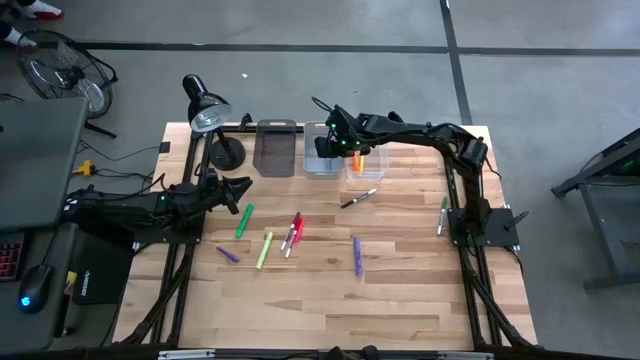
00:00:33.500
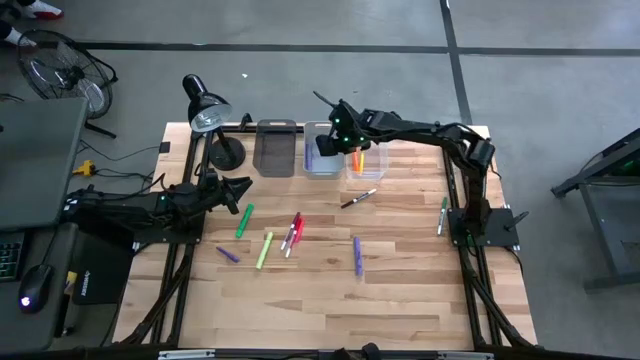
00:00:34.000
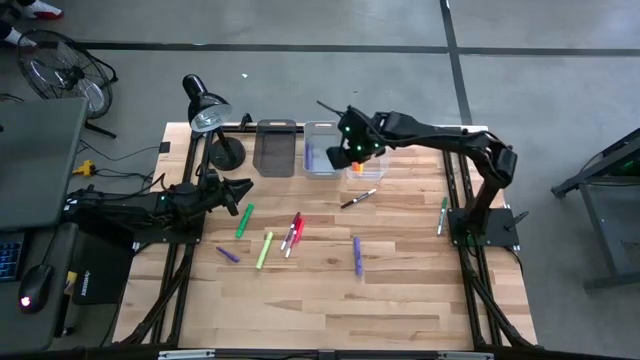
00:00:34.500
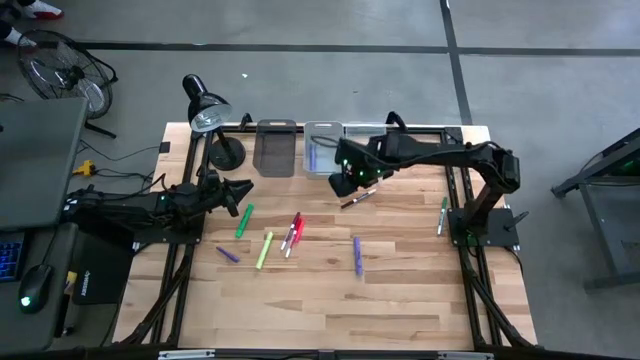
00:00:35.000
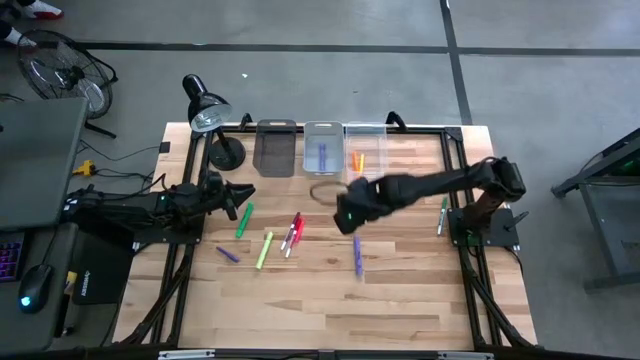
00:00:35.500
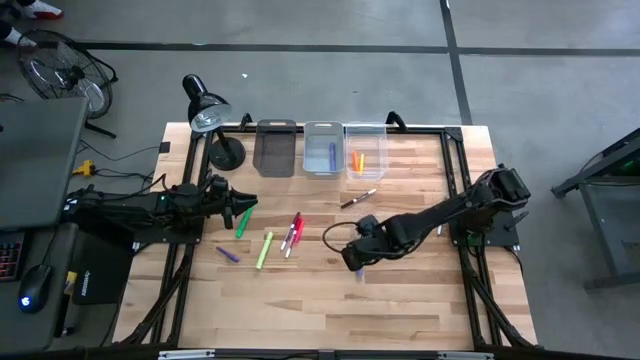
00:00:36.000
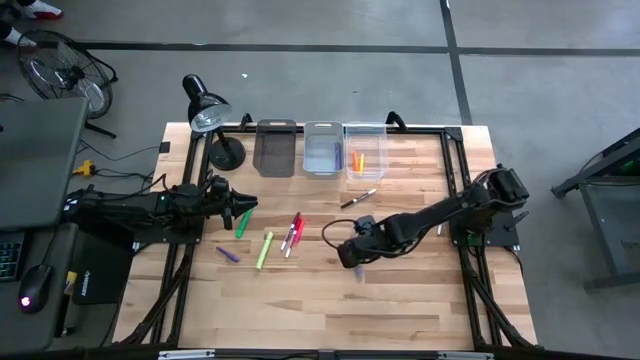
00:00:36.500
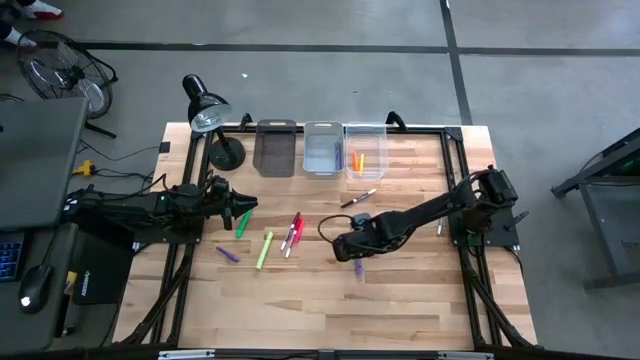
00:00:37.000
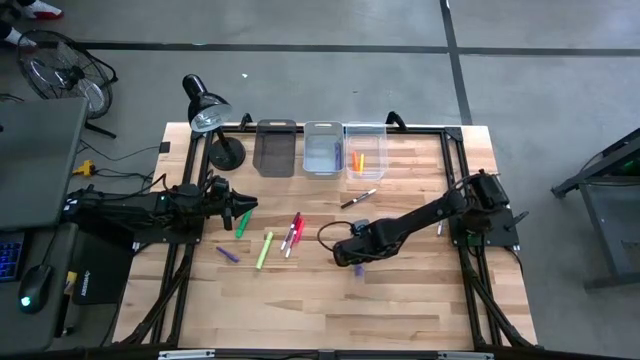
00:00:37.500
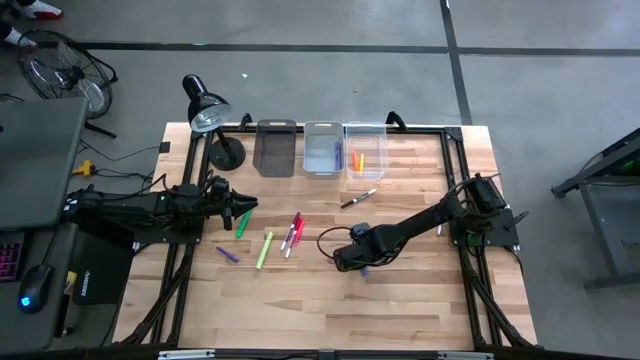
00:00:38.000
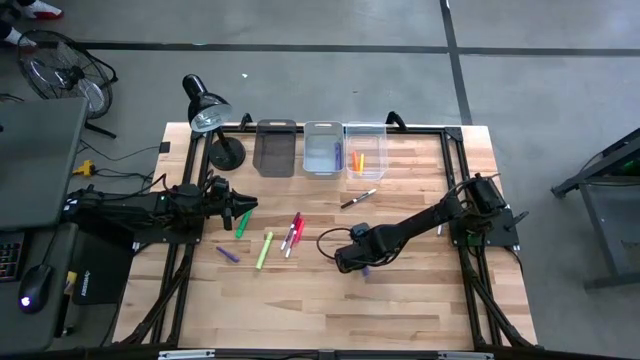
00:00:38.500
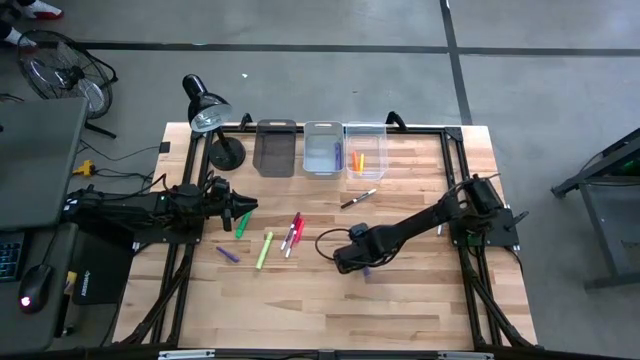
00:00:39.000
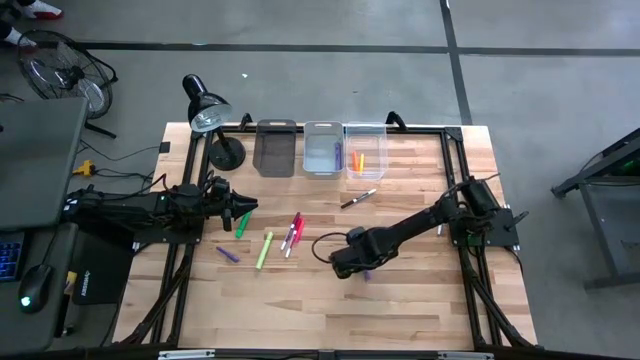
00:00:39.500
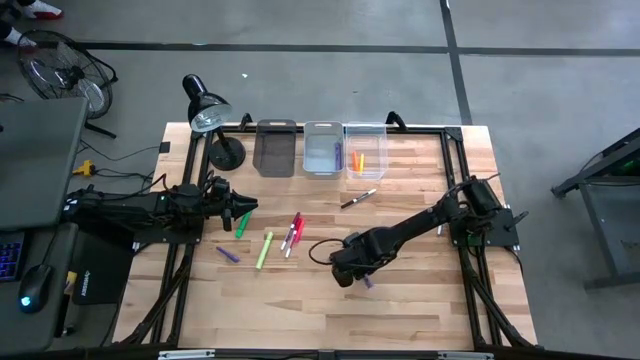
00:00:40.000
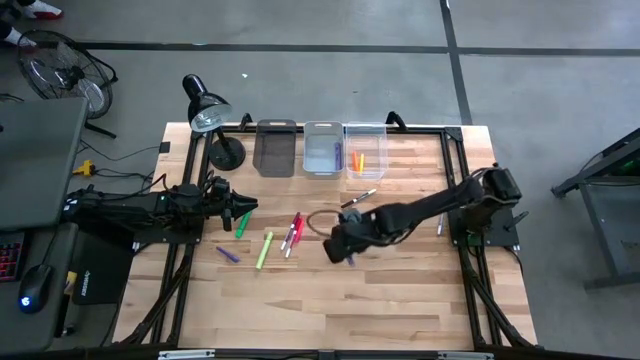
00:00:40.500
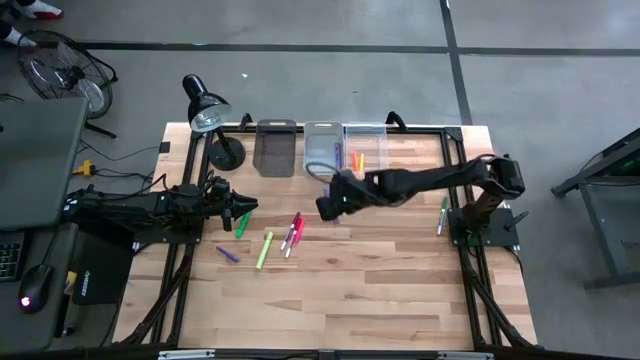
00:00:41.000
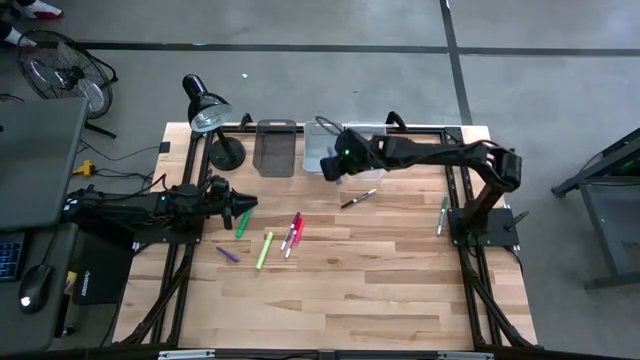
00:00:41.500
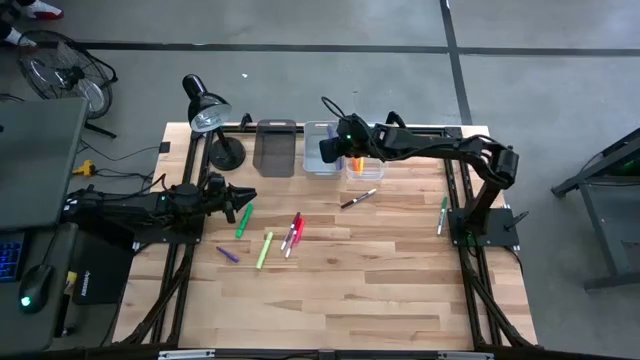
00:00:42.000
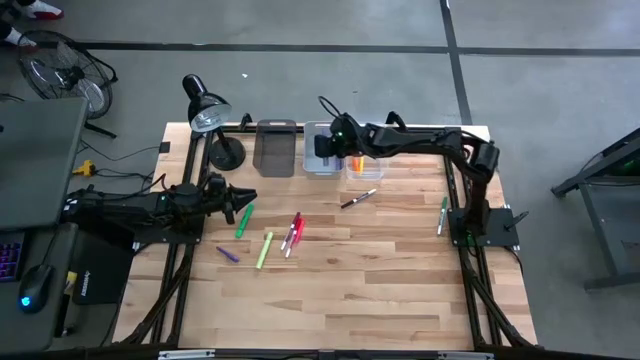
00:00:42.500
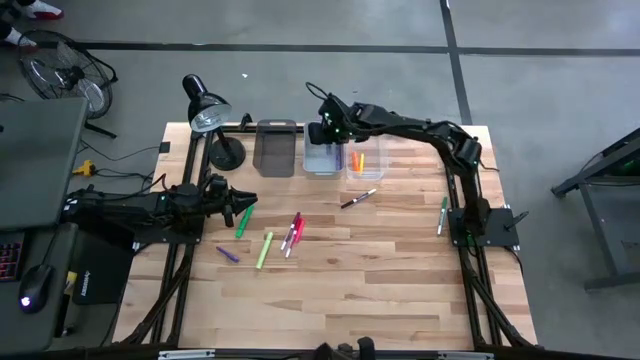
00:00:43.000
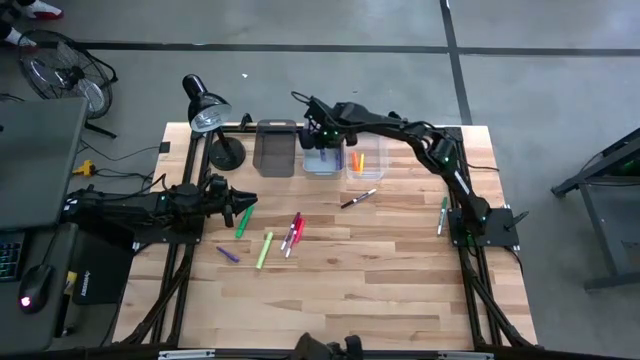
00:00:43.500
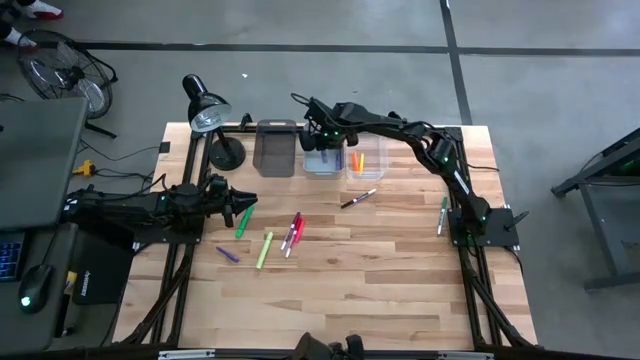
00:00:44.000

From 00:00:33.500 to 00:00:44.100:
Task: Pick & Place Markers
Put the violet highlighter into the white bin

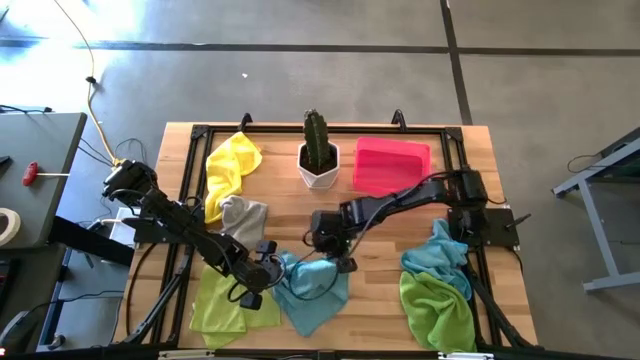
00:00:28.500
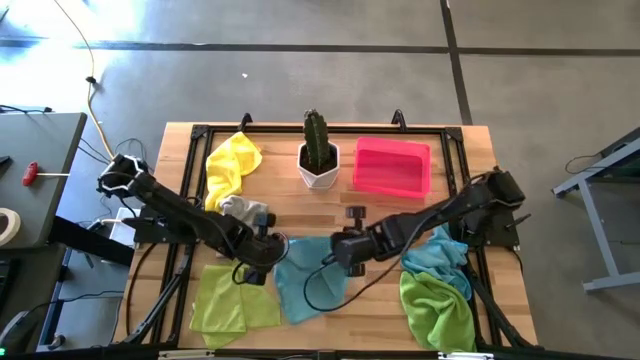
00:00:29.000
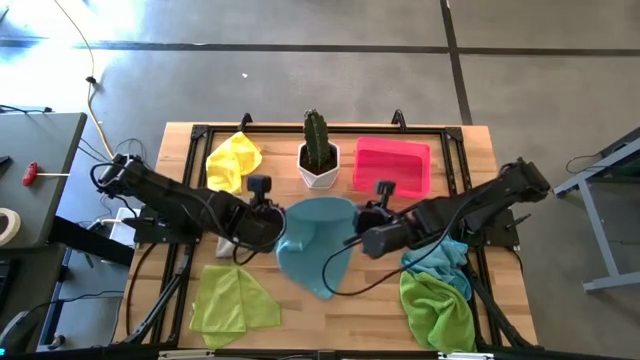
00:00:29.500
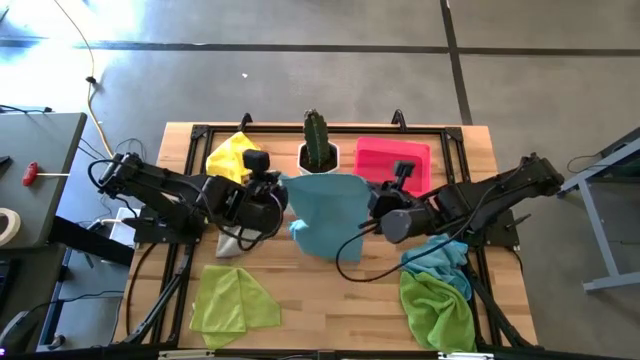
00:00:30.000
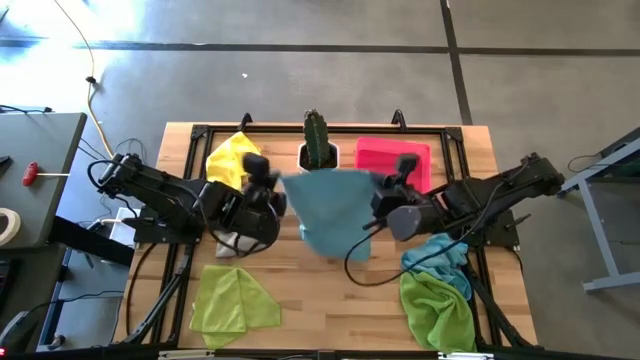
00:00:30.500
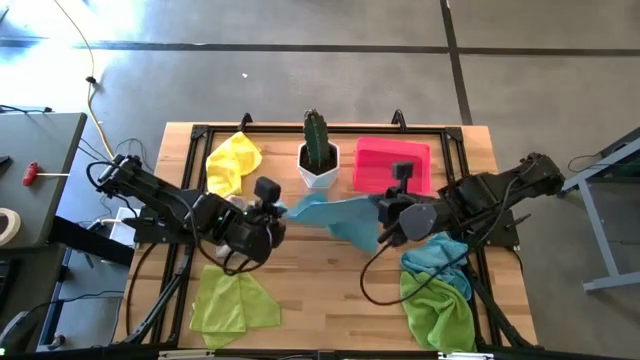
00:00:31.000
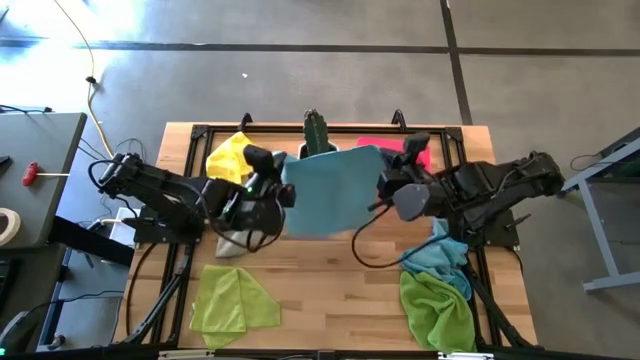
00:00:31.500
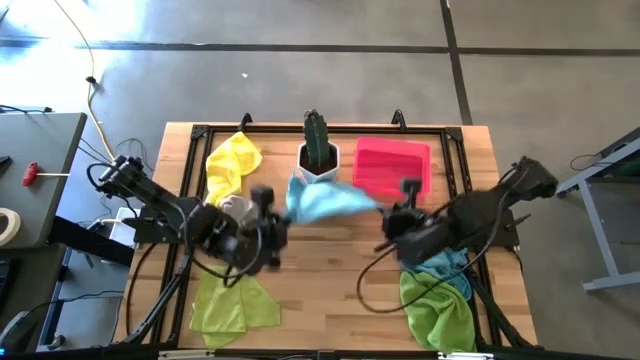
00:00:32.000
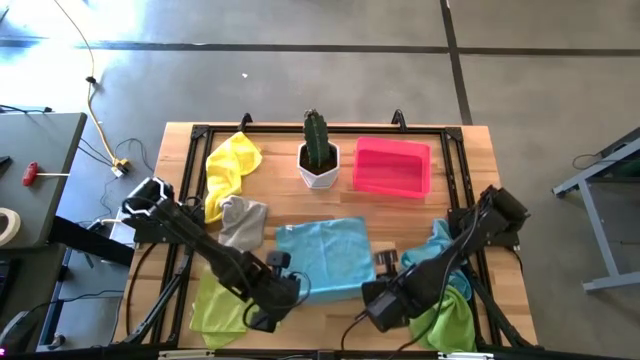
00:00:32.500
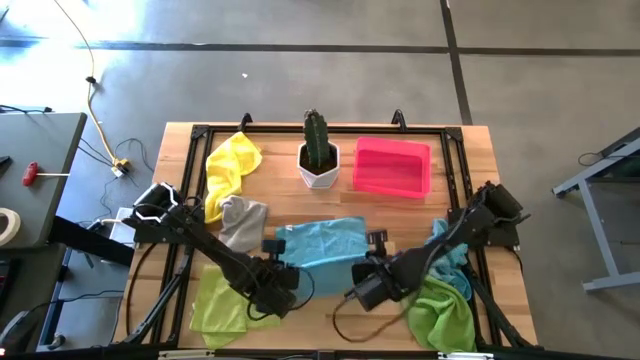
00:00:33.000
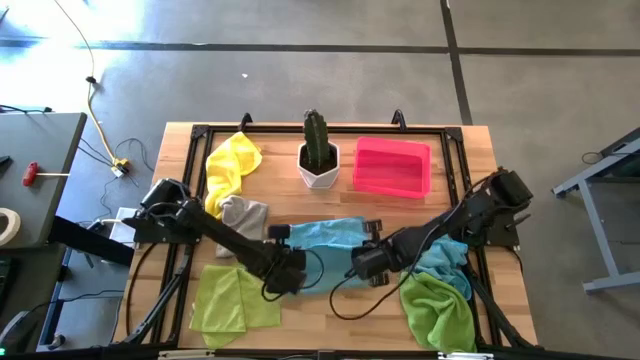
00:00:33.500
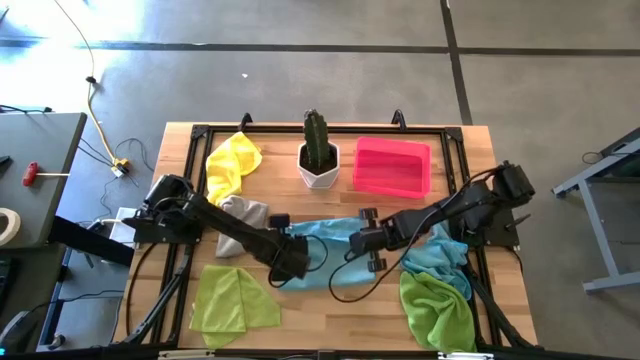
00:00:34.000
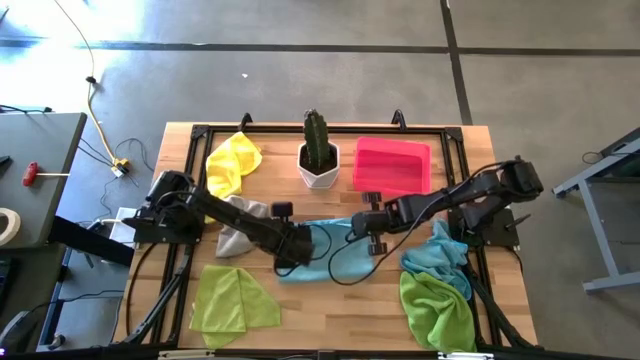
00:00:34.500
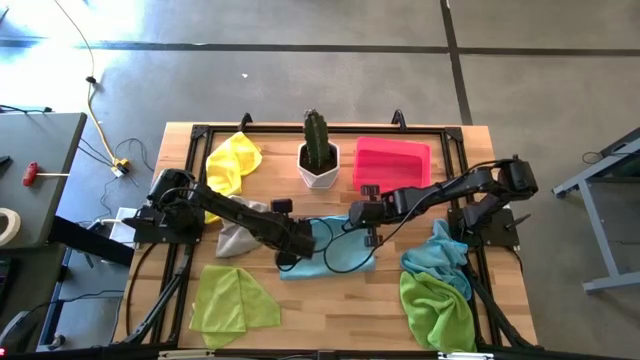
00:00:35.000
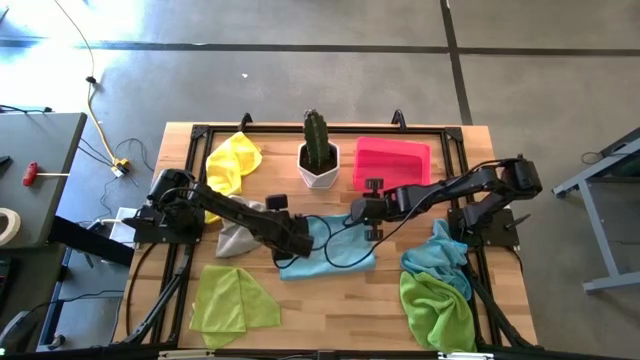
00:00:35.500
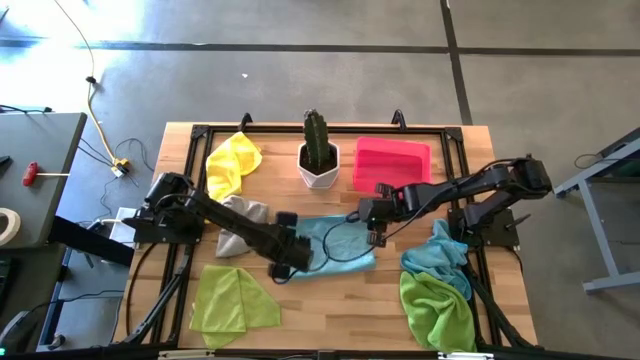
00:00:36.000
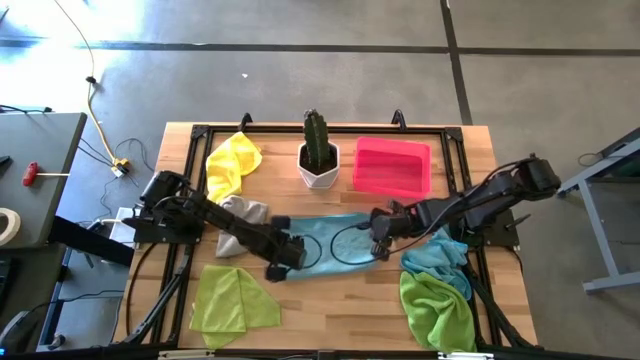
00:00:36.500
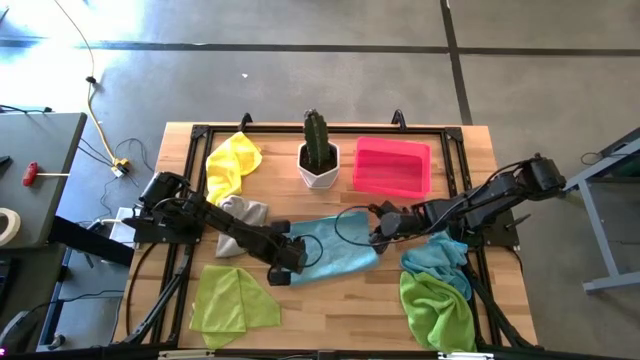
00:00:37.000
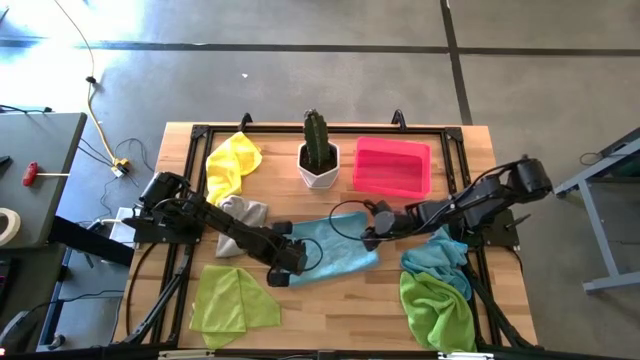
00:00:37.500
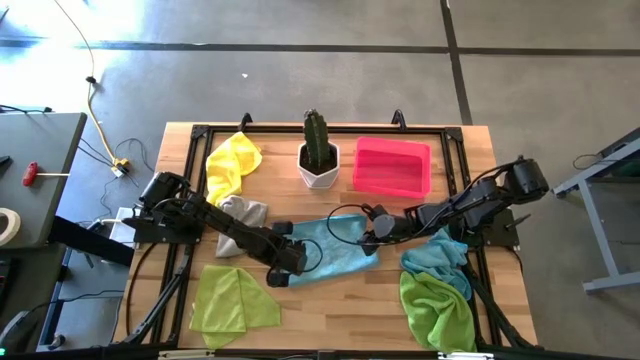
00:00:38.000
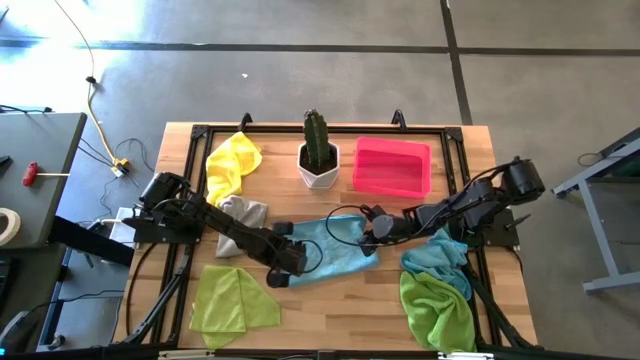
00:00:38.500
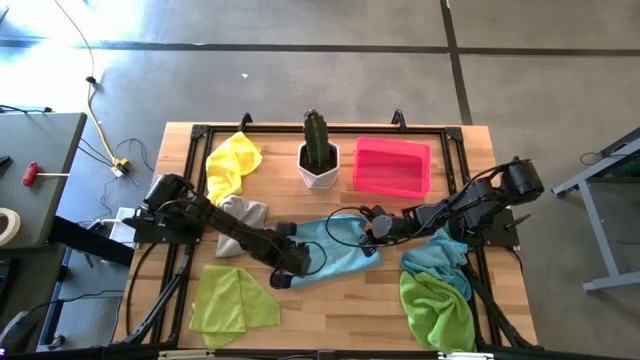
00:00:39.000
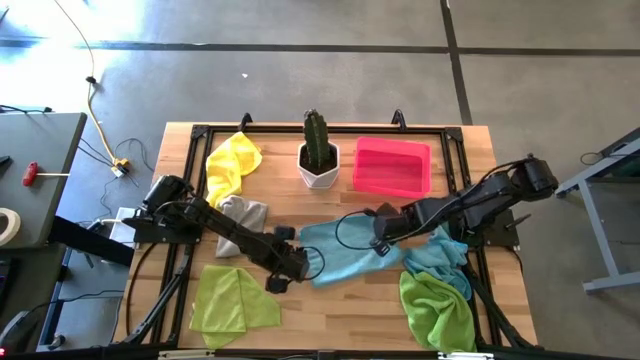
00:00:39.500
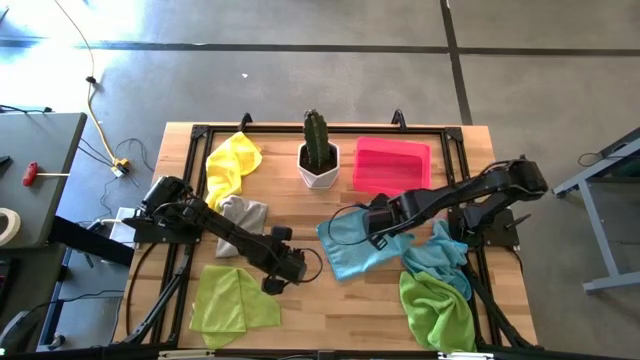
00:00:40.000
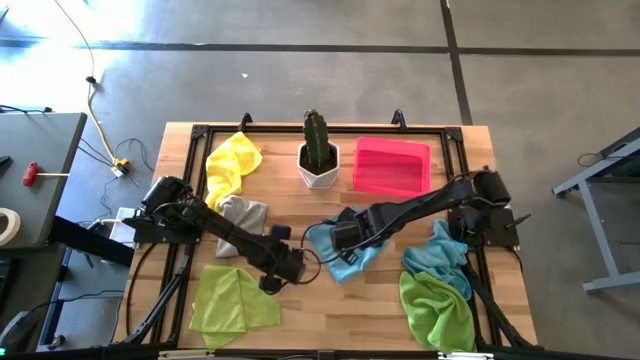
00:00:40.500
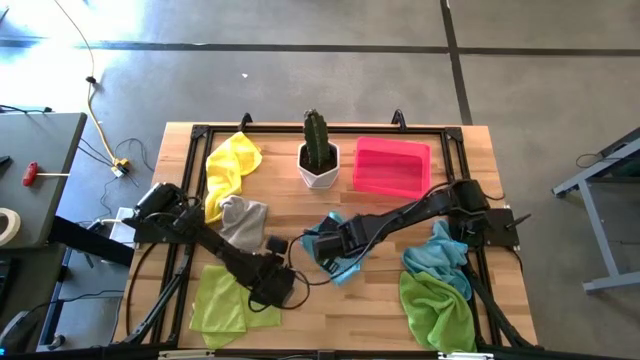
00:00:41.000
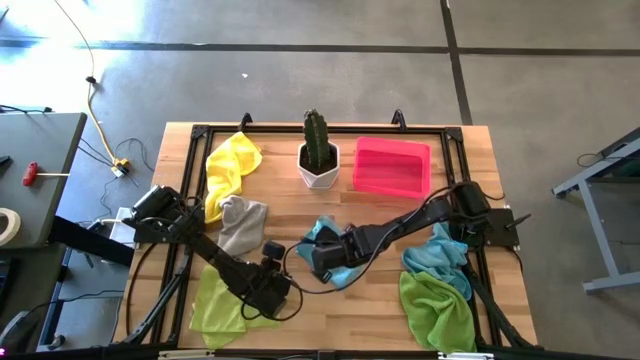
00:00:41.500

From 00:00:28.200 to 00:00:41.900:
Task: Fold microfiber towels
Fold the blue towel
